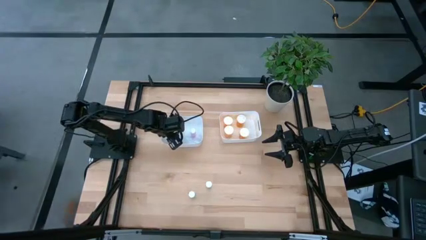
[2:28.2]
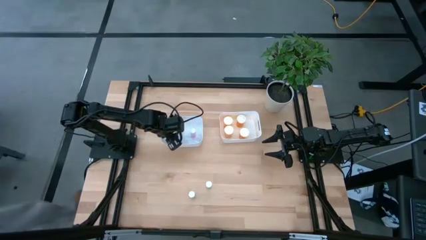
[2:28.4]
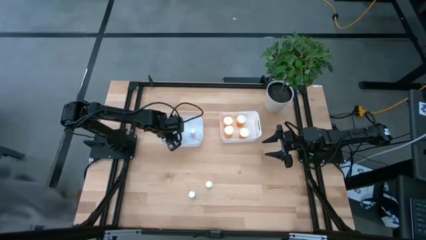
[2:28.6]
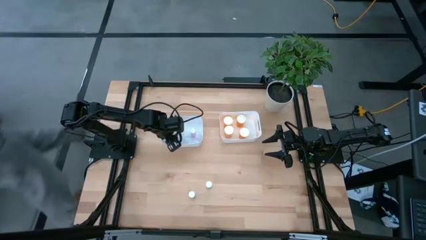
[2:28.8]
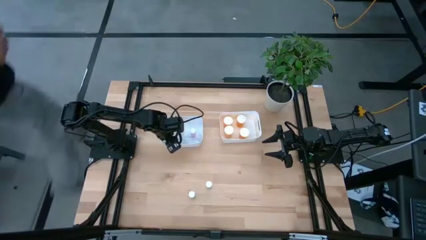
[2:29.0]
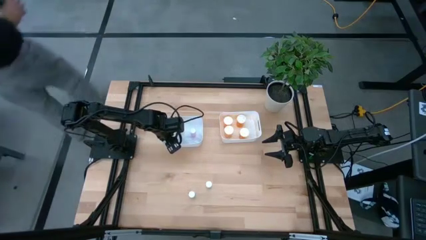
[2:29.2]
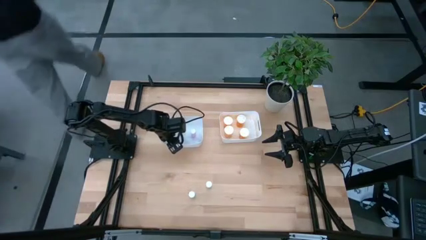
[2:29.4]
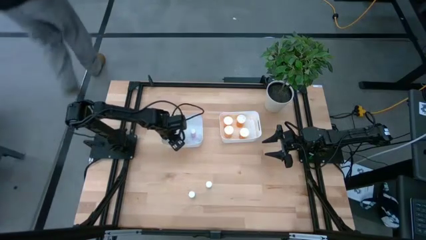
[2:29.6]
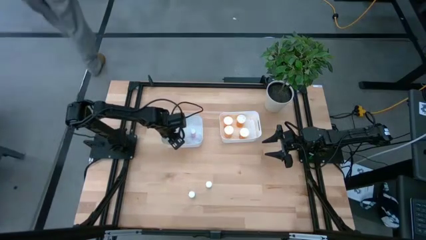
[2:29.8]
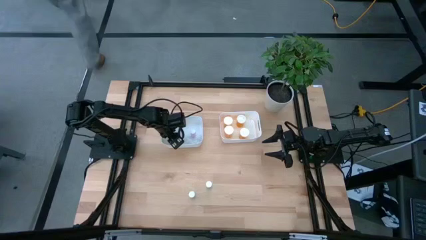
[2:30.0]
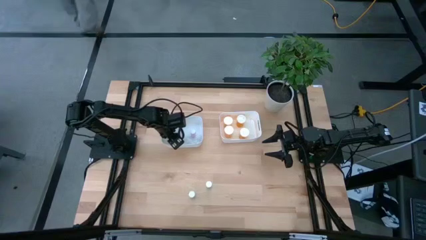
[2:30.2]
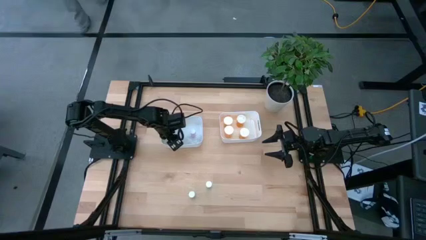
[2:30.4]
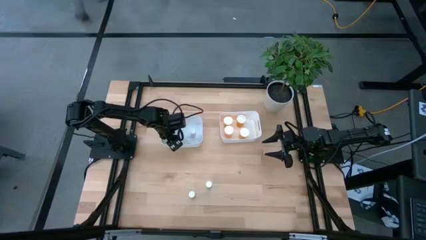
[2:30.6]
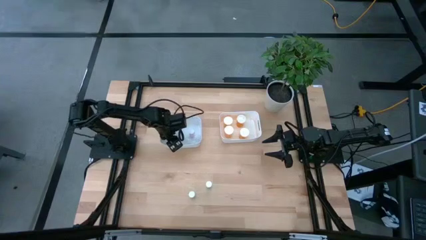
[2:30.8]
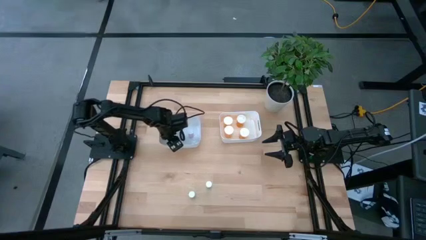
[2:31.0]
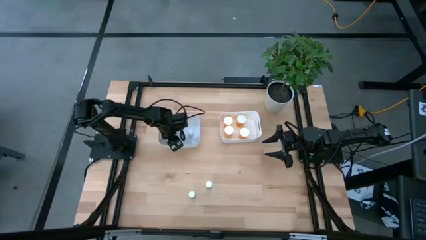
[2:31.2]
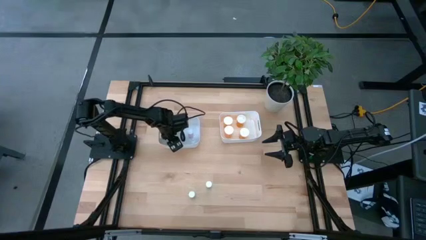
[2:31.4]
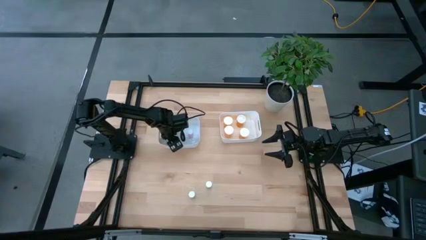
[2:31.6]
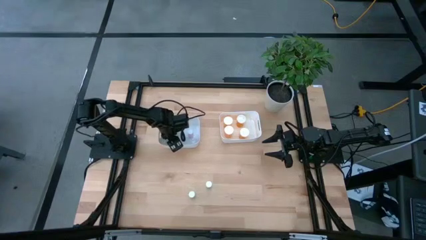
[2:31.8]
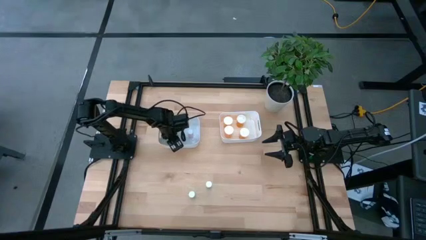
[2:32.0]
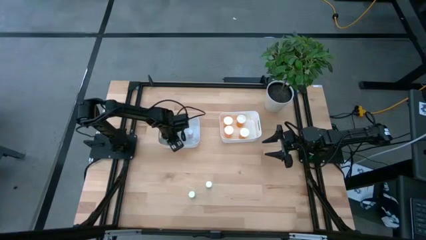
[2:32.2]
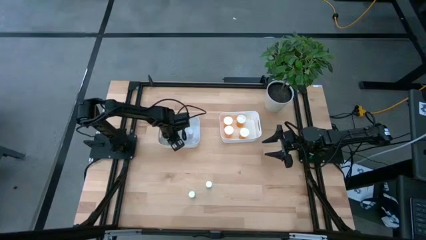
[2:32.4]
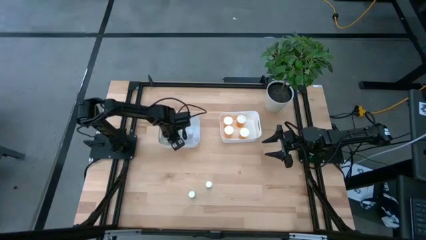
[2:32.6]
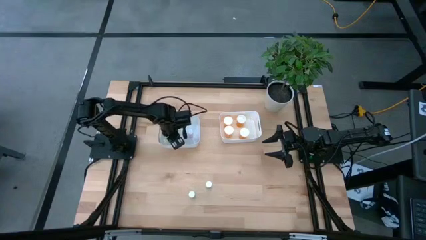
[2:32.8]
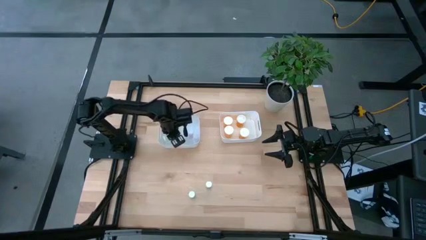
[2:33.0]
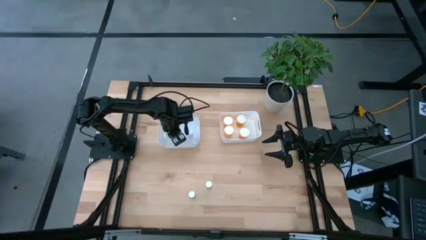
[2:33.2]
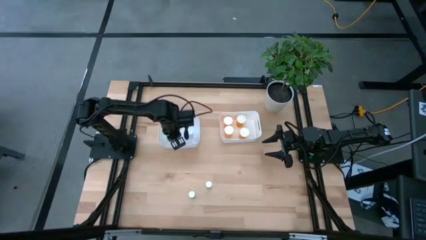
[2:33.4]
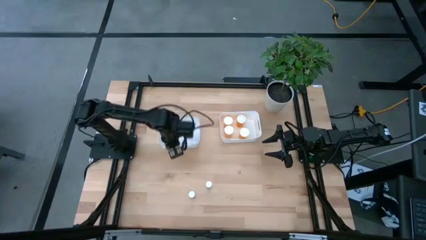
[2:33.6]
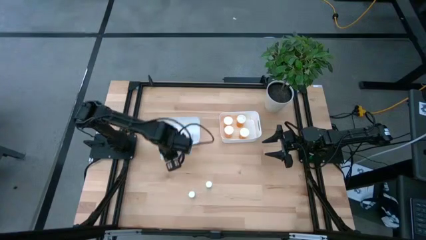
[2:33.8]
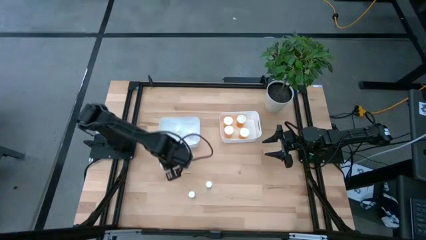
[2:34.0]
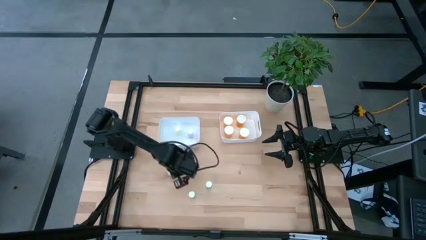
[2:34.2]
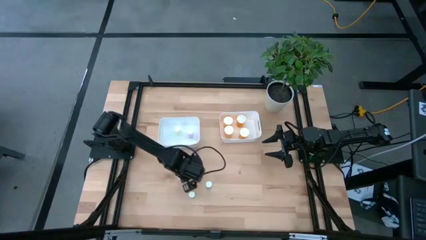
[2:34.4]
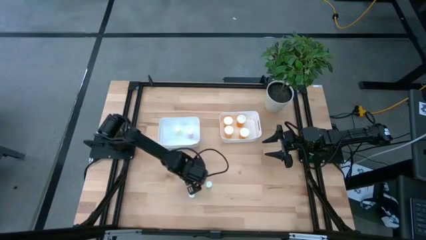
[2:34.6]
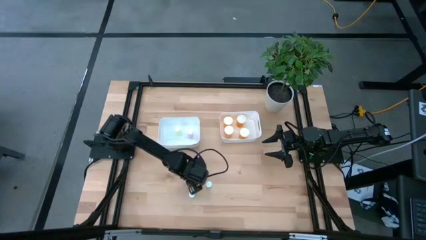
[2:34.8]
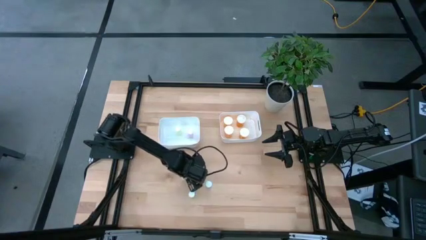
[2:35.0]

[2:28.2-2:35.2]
Task: Pick and place medicine bottles into bin by pill shape (circle, oval)
Move the yellow pill bottle from the white bin to the table

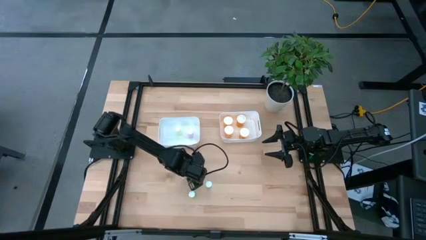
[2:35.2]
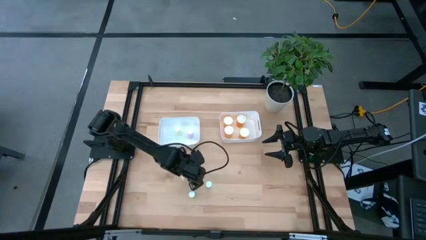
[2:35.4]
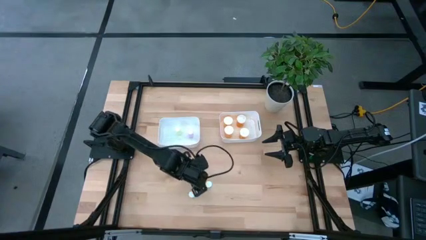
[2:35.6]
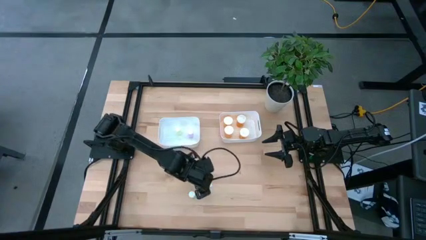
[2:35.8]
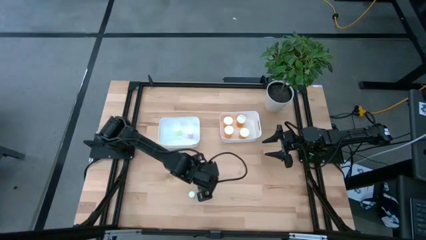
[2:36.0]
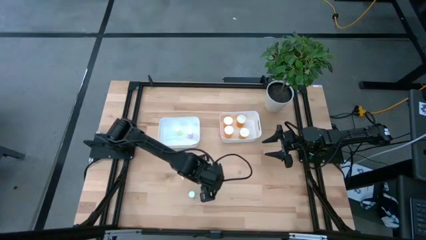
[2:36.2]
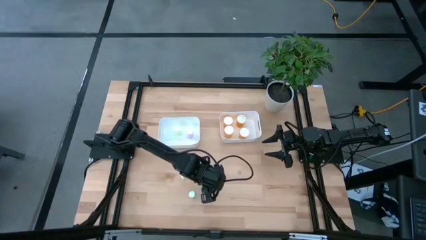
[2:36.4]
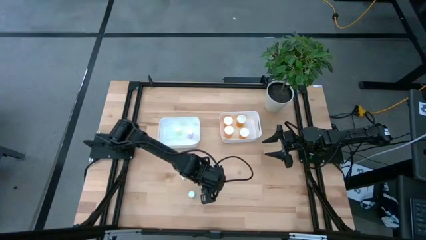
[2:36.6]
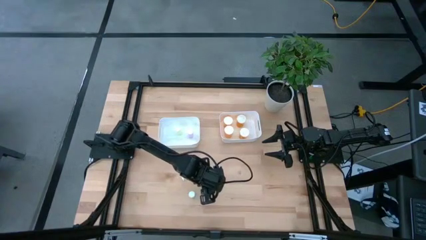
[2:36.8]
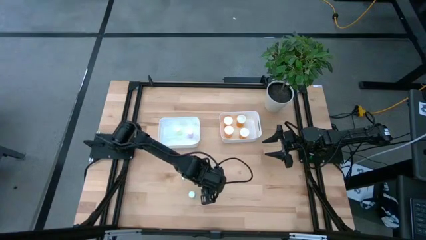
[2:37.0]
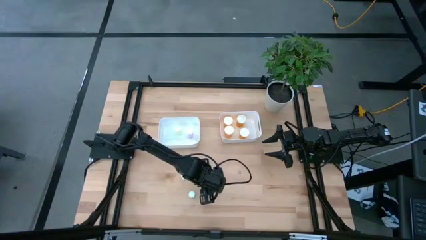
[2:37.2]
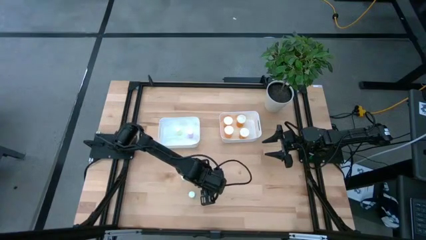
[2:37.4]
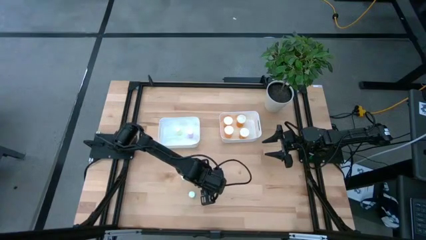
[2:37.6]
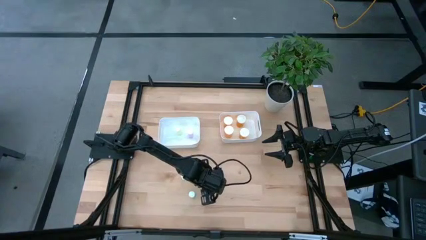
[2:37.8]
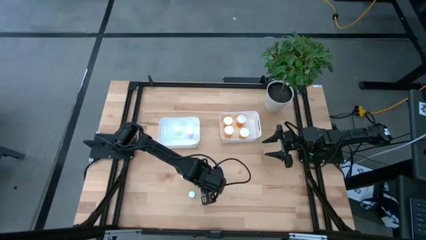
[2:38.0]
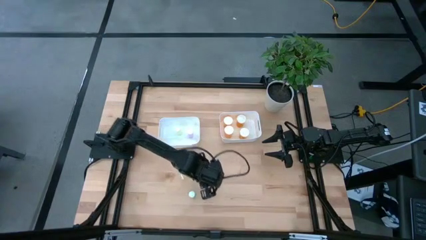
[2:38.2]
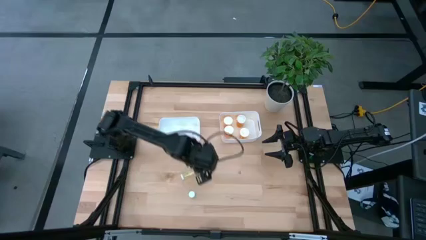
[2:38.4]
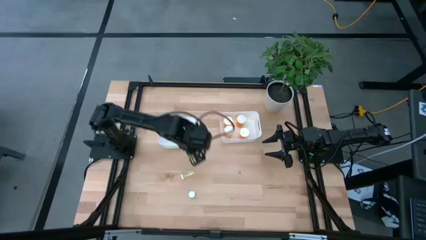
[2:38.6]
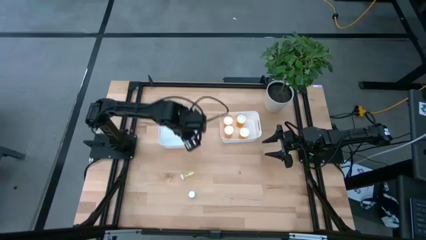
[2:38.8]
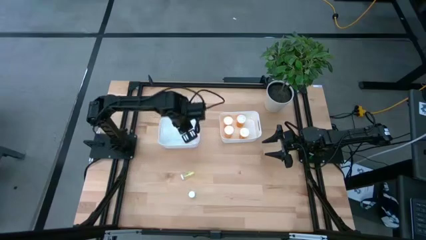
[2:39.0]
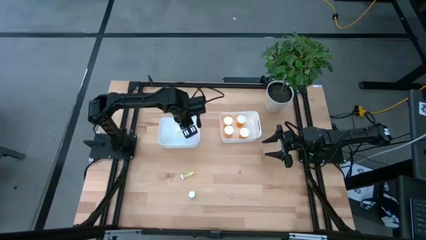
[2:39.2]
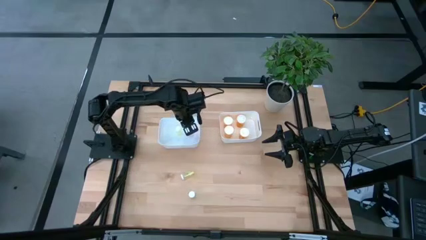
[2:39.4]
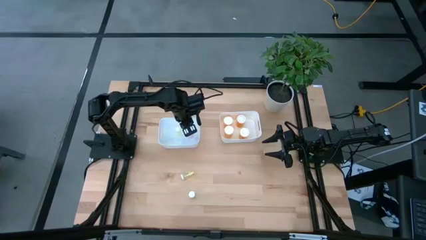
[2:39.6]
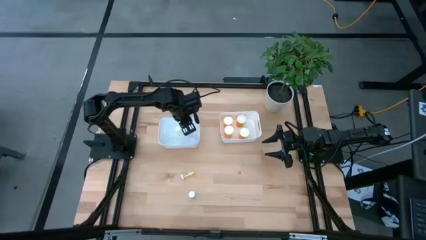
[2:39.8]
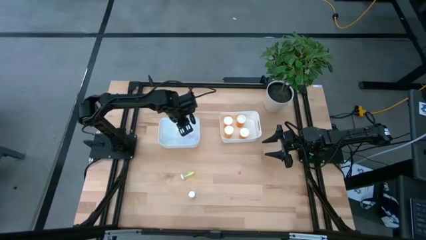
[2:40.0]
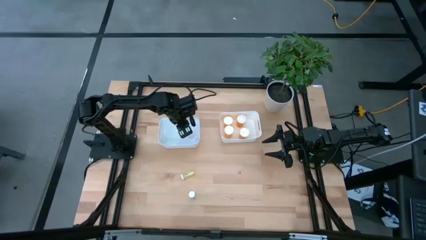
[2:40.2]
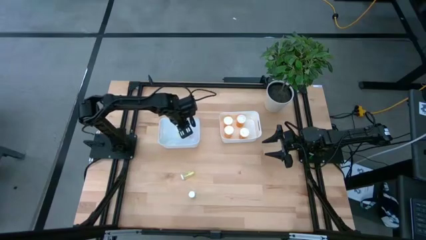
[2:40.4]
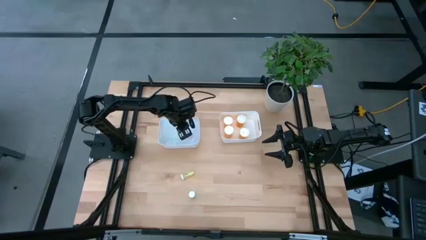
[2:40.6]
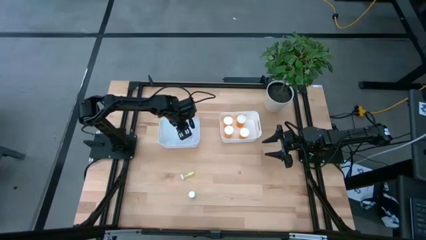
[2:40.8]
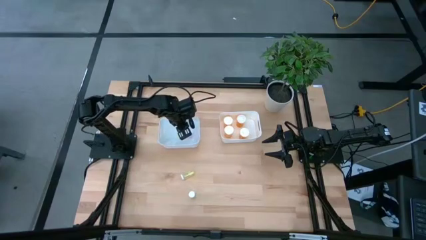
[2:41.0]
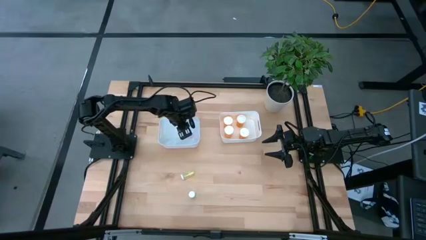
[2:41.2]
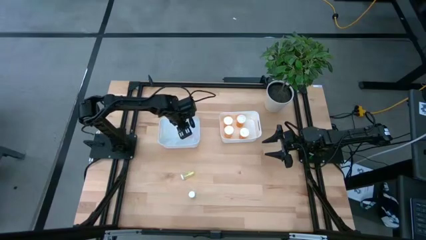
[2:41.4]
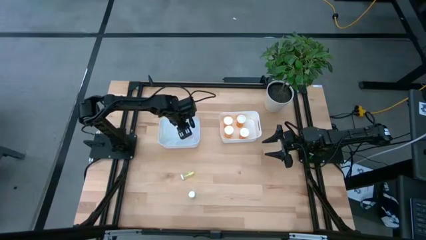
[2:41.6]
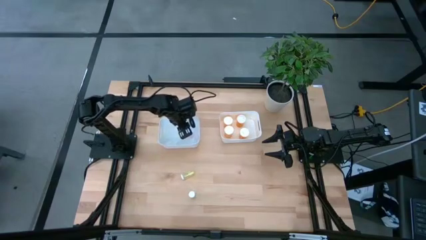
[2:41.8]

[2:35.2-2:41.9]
Put the right blue pill bottle into the left white bin

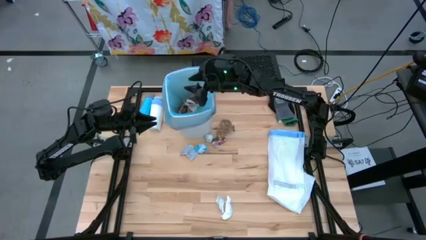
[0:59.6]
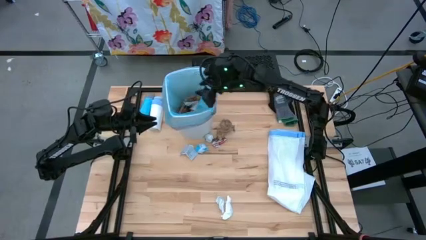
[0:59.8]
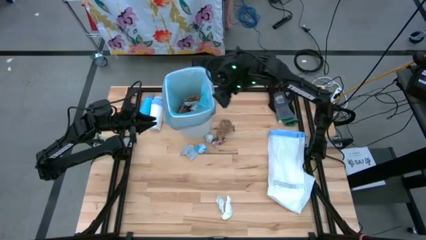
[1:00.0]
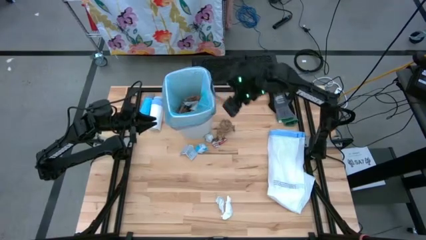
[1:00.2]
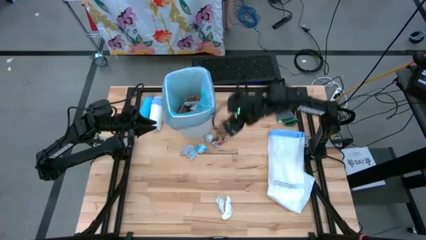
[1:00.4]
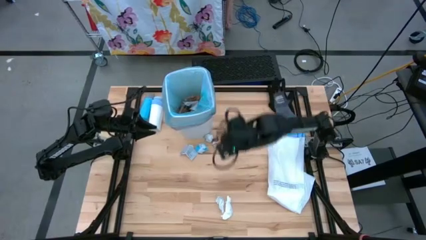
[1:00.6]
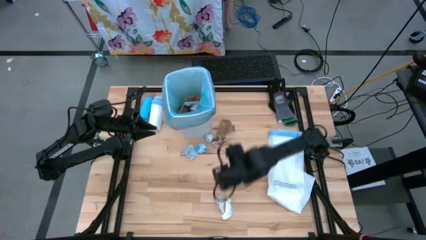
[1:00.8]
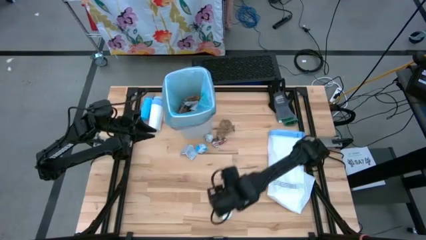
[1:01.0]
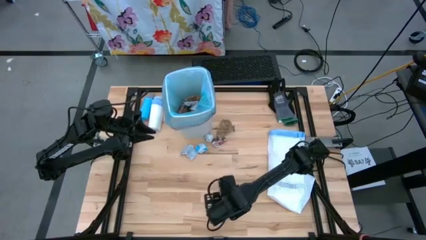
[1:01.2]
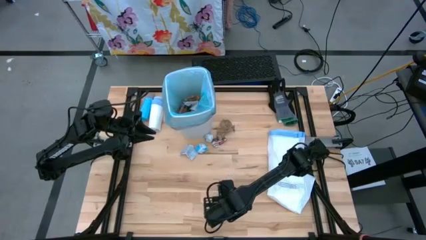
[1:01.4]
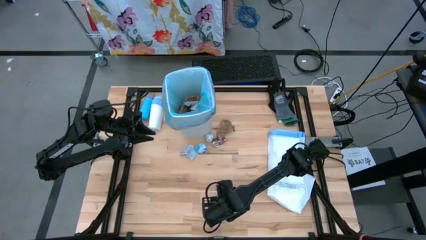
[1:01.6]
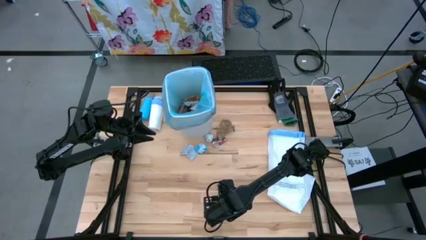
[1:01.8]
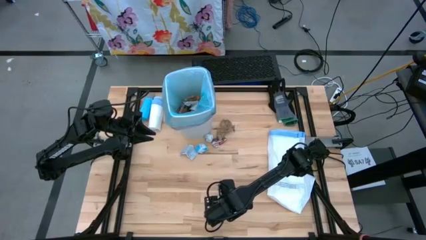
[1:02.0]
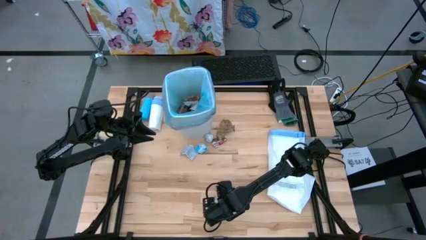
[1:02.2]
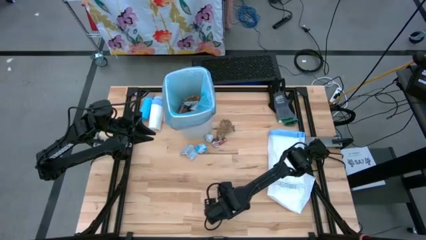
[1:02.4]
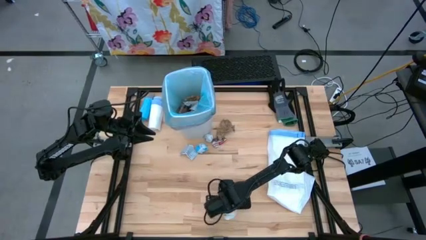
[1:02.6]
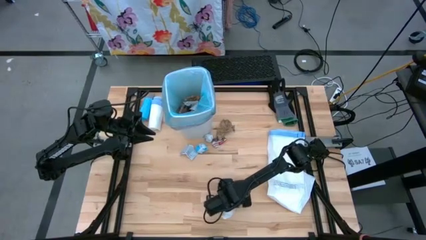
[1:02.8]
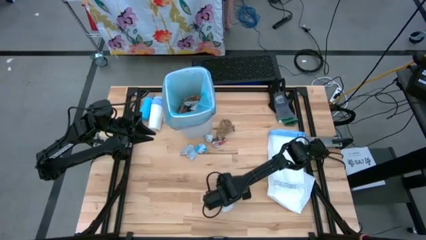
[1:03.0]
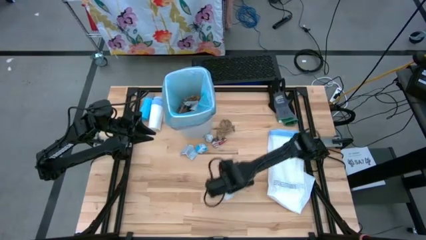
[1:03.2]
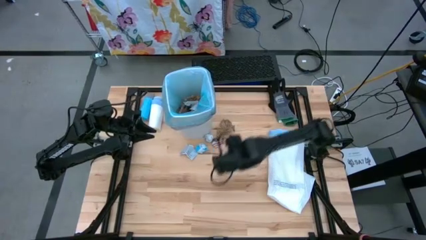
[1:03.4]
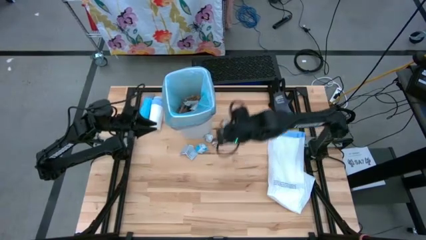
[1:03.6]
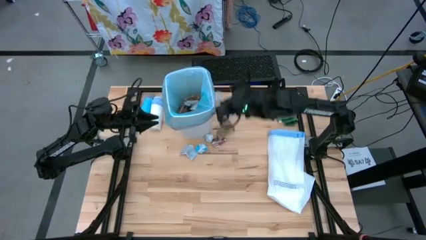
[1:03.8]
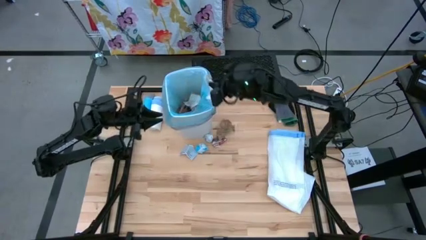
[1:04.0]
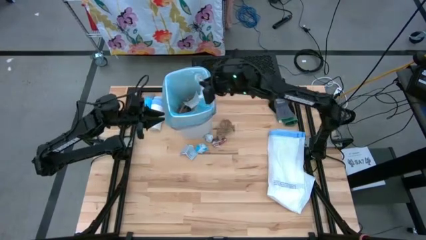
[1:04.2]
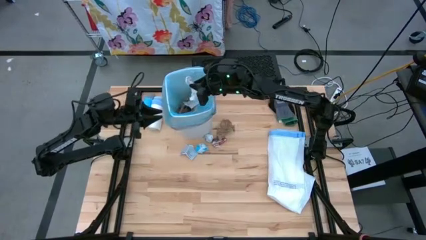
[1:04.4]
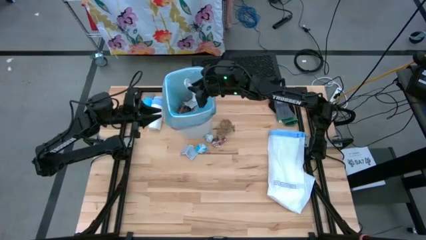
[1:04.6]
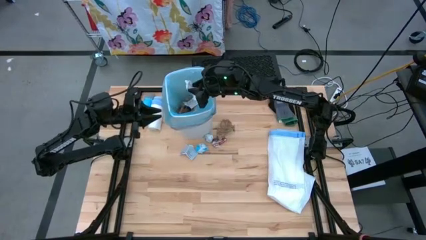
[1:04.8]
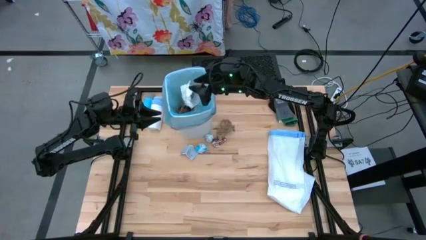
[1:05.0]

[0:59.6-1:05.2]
Task: place trash/remove bag and relplace
Put the white paper into the white trash bin
